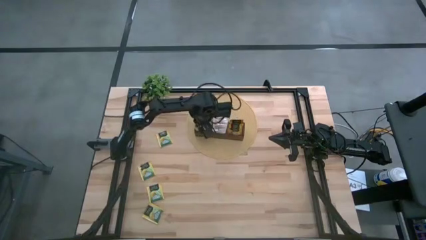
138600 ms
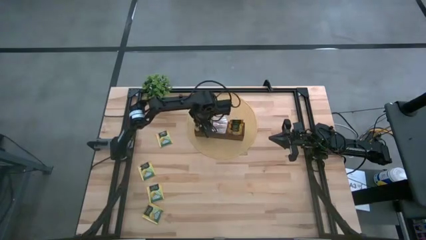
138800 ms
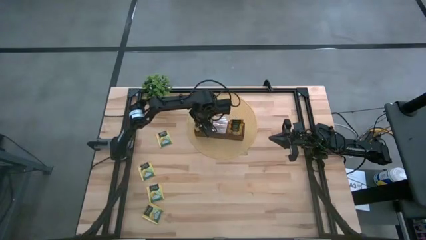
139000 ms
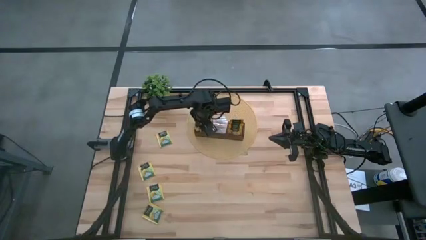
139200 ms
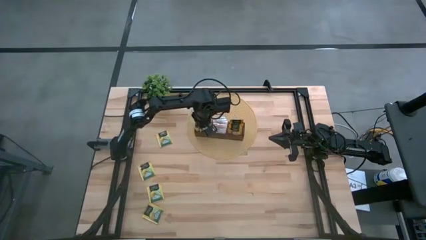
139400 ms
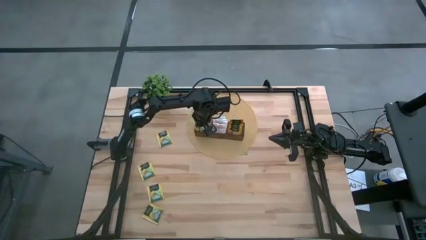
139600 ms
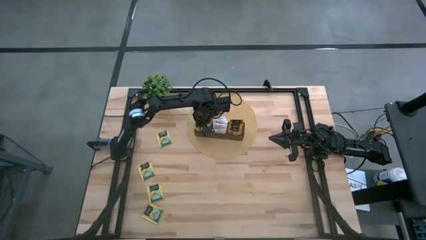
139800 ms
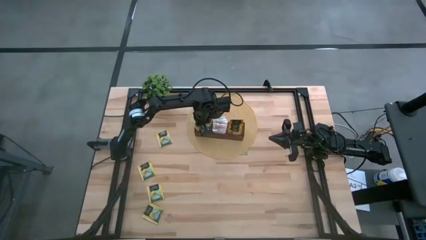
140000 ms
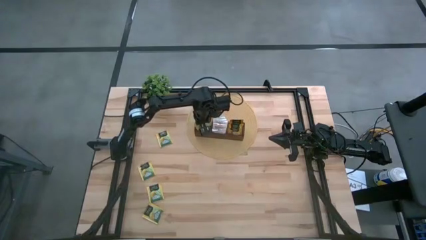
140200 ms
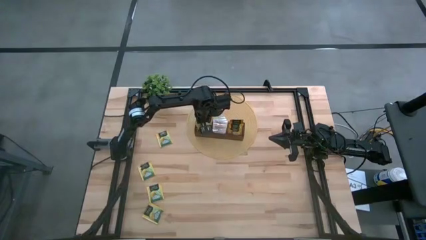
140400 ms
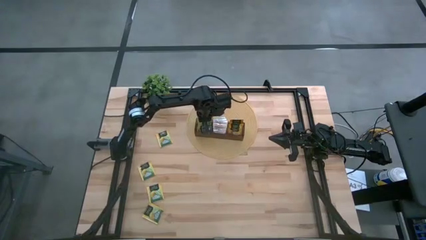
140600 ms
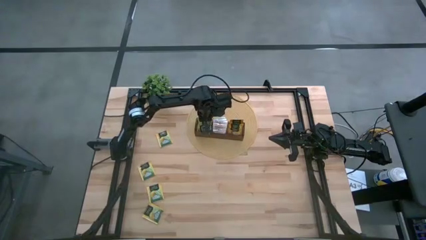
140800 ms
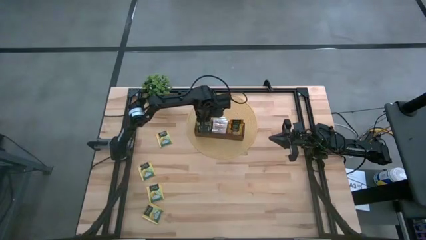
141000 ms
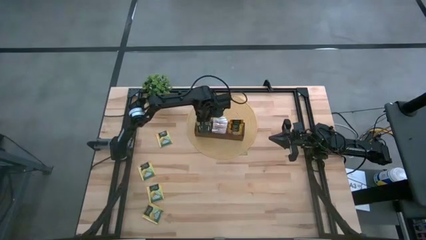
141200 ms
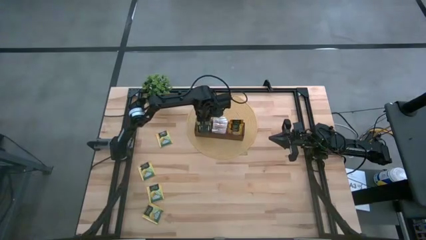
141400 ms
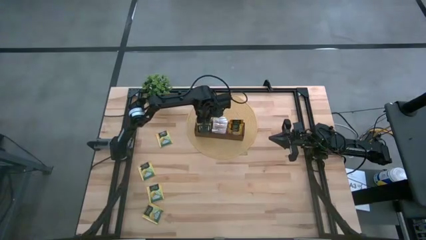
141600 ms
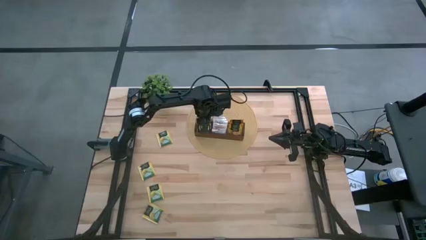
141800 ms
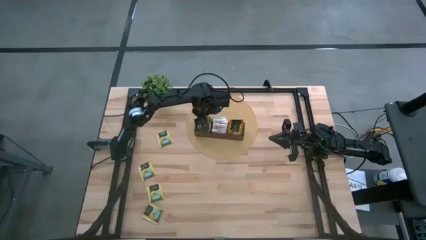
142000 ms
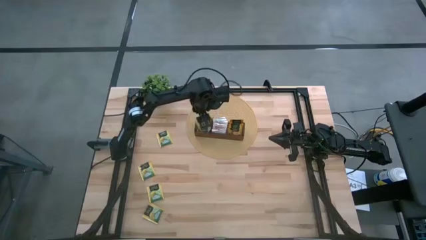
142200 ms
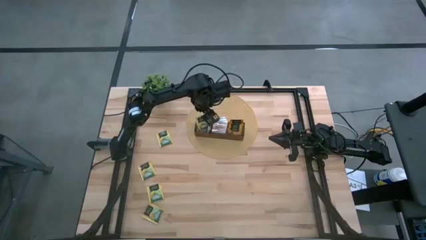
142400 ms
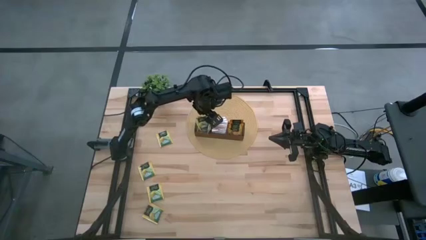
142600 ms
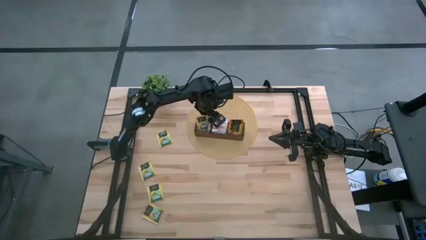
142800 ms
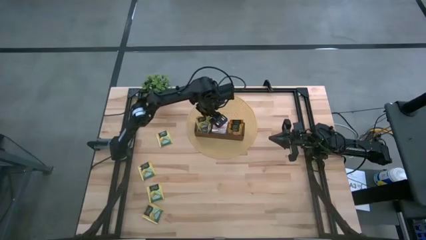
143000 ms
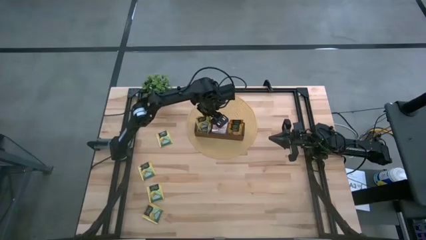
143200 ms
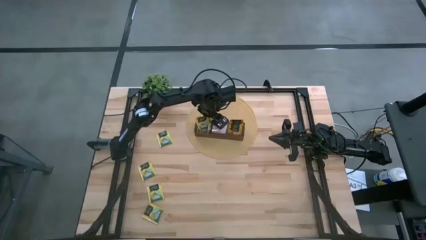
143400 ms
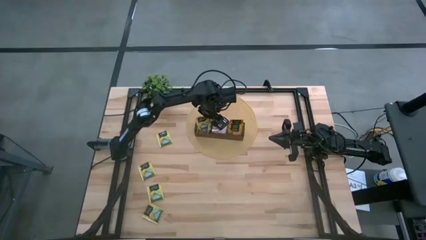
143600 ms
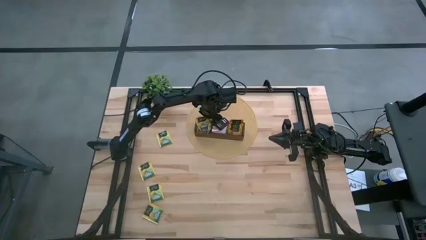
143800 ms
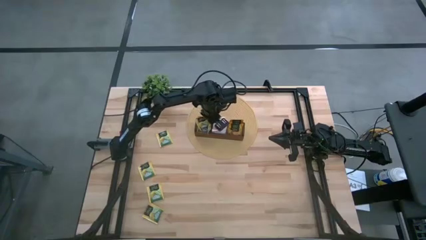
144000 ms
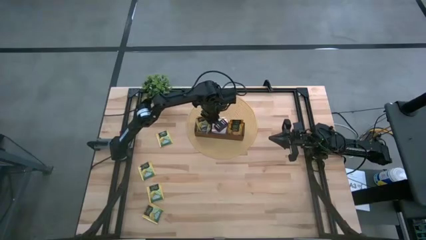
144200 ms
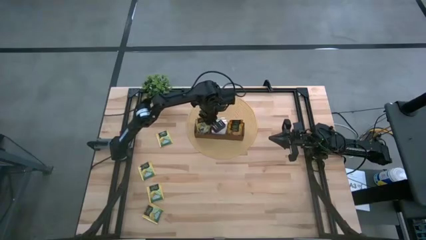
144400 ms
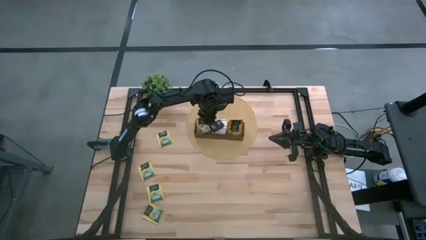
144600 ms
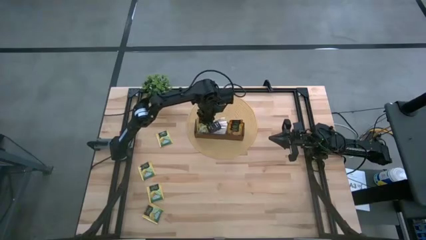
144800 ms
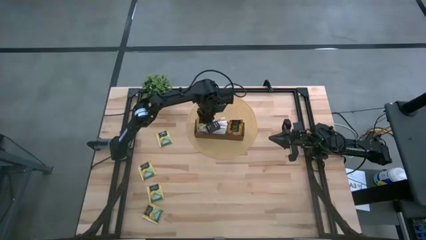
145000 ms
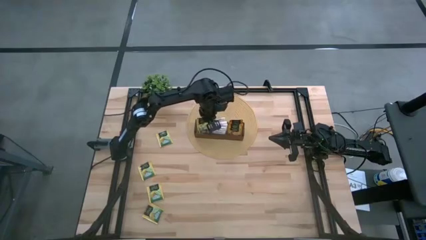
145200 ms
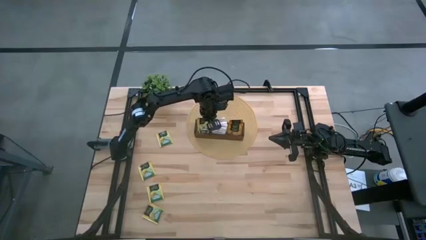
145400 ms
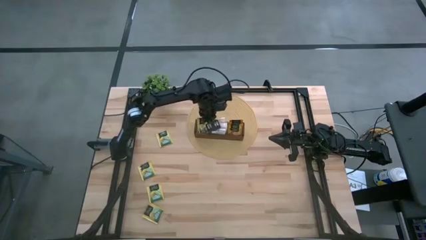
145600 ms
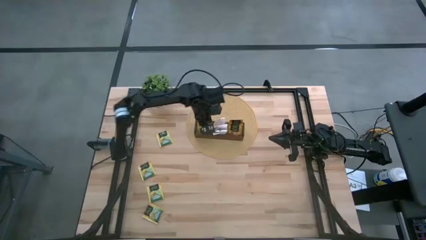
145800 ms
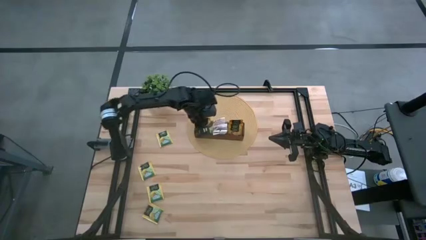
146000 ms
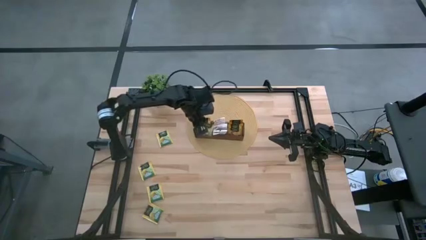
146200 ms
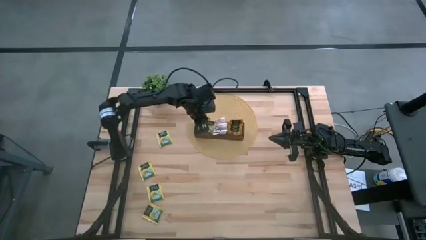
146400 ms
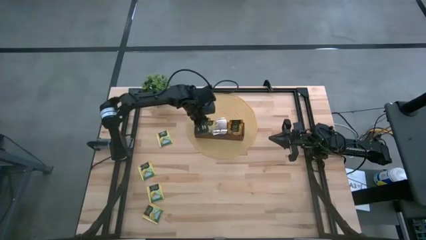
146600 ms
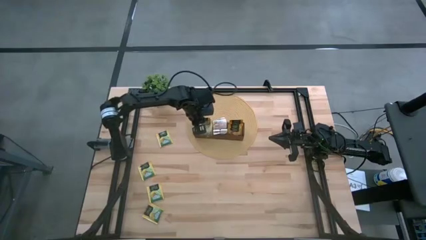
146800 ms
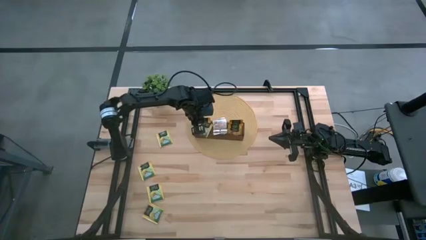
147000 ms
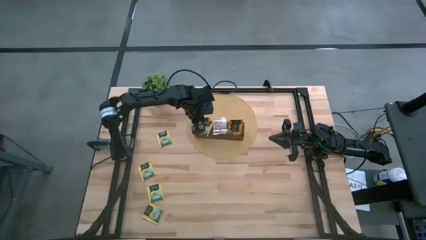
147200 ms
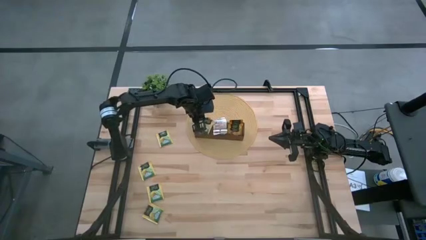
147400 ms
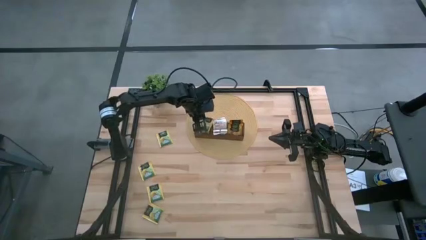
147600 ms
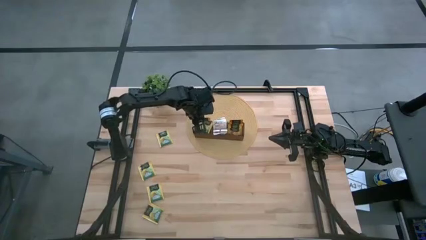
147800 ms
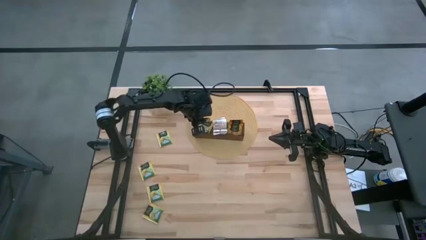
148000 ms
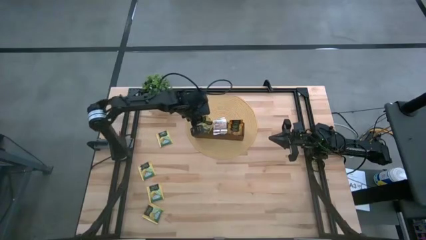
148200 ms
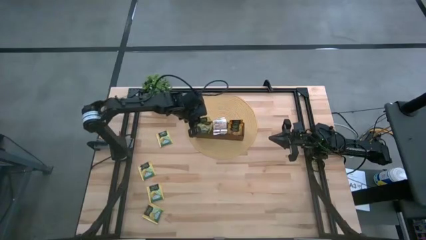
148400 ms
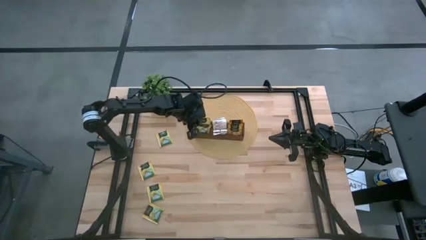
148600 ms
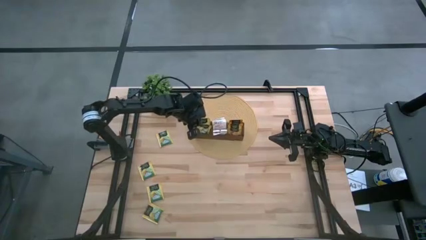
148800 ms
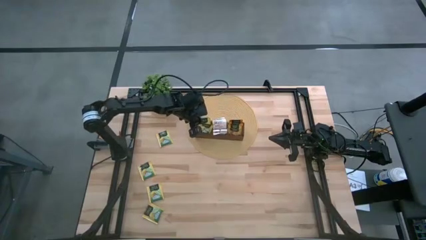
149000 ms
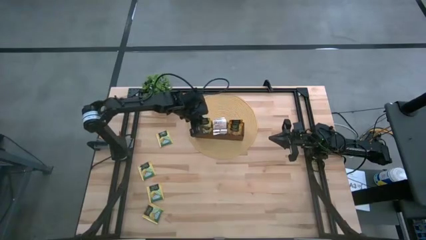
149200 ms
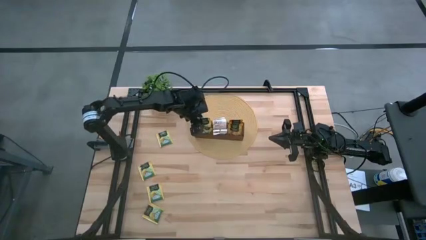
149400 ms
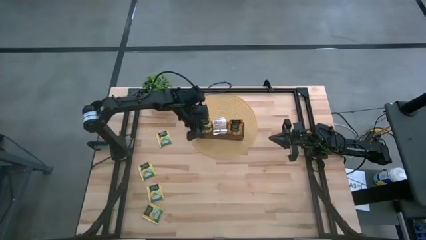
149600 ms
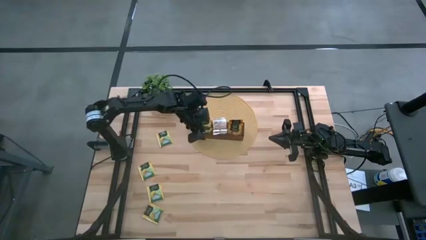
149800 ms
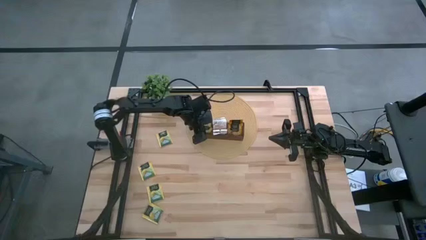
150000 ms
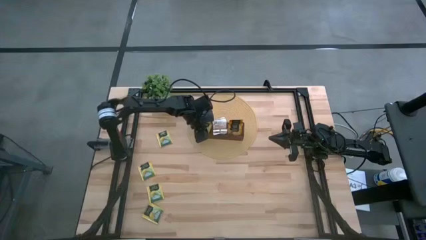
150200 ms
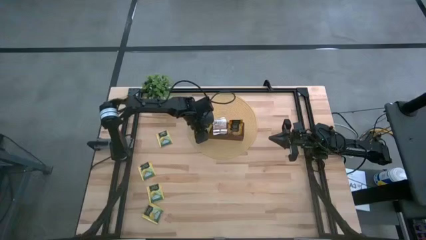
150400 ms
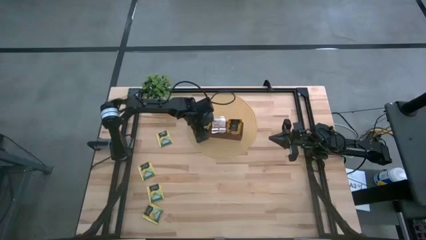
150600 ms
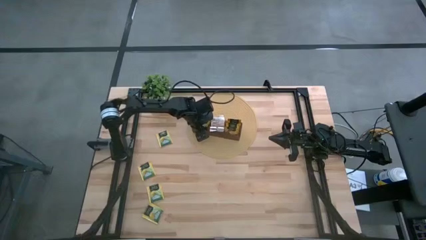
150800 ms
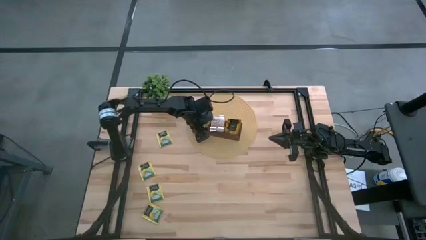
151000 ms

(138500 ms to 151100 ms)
Task: Pick & Place Tea
Adjust the yellow tea bags in the left section of the wooden organizer

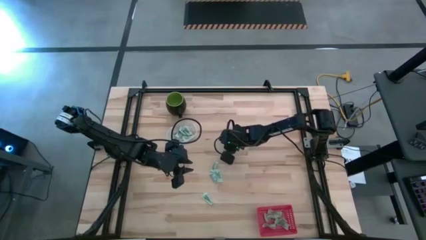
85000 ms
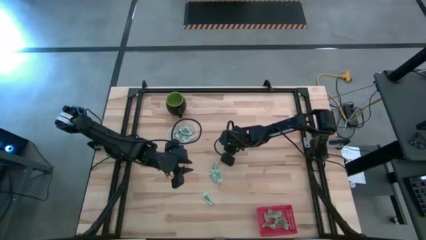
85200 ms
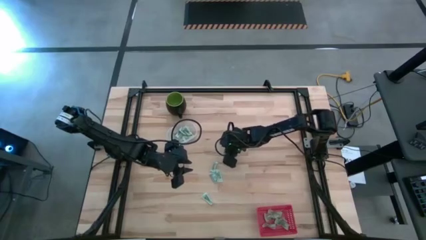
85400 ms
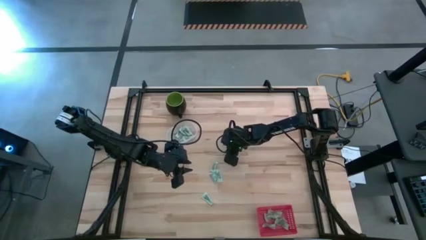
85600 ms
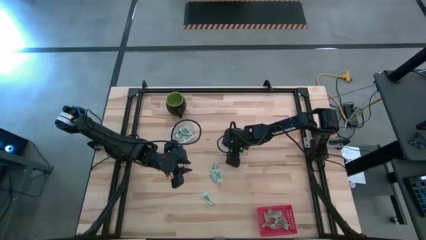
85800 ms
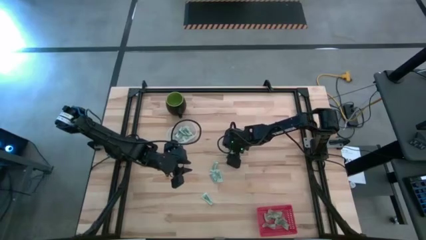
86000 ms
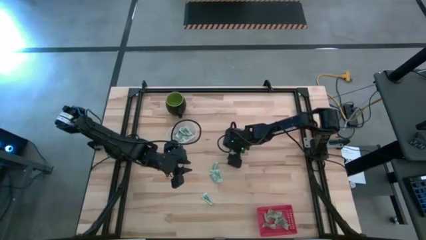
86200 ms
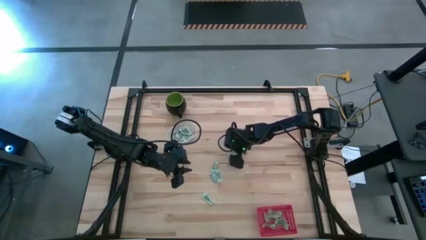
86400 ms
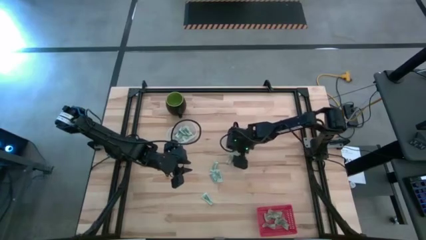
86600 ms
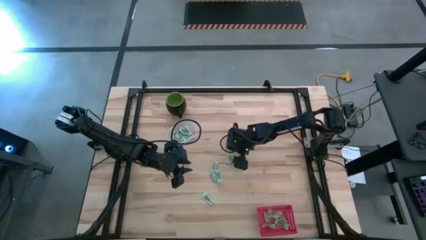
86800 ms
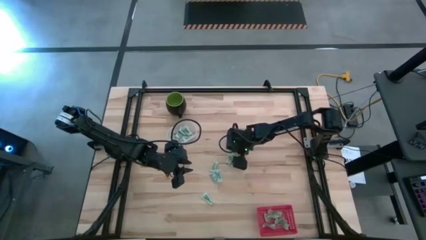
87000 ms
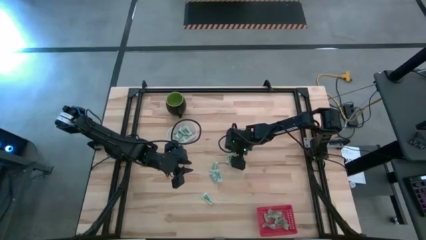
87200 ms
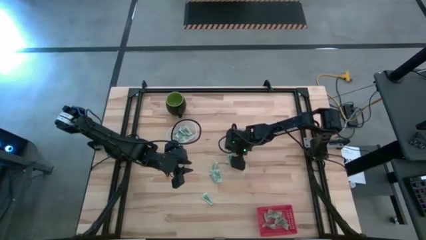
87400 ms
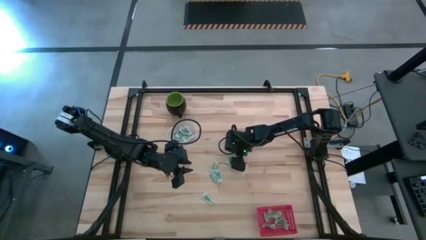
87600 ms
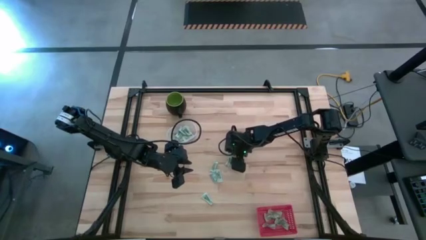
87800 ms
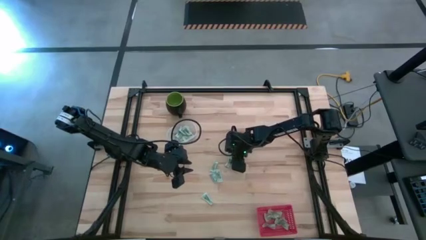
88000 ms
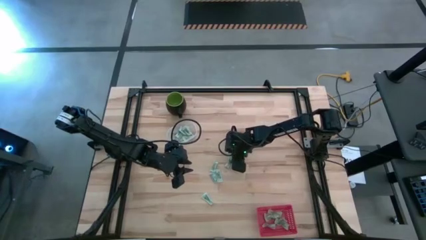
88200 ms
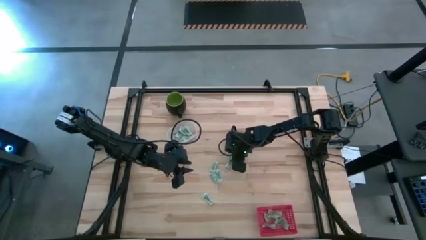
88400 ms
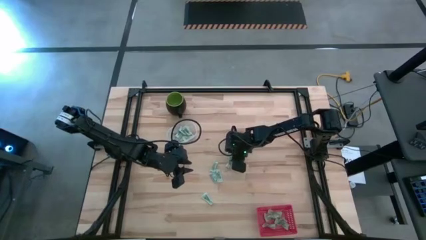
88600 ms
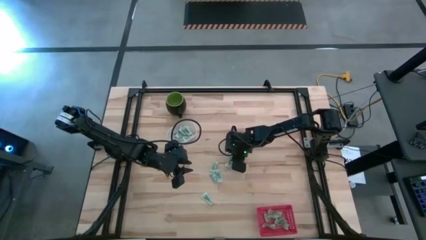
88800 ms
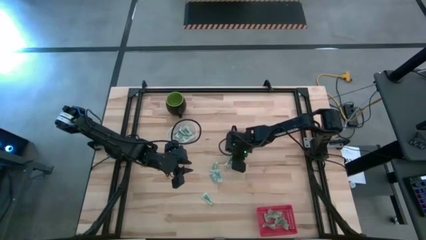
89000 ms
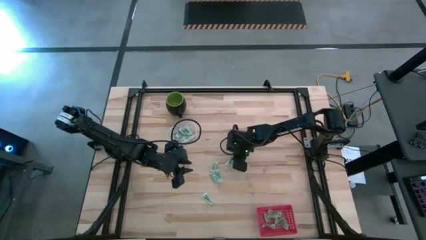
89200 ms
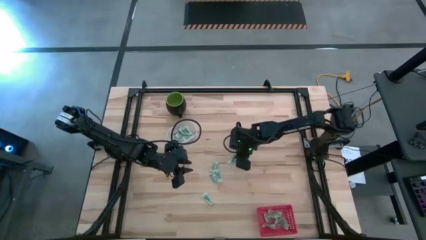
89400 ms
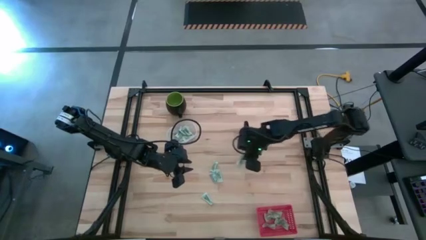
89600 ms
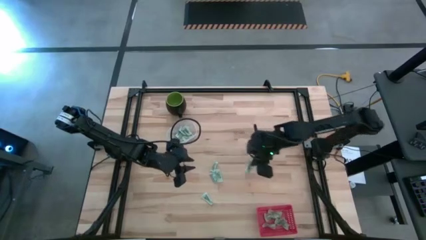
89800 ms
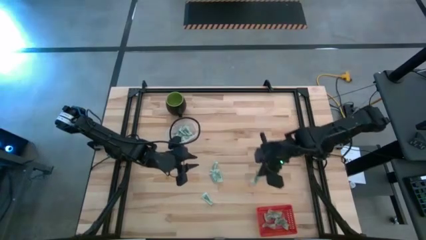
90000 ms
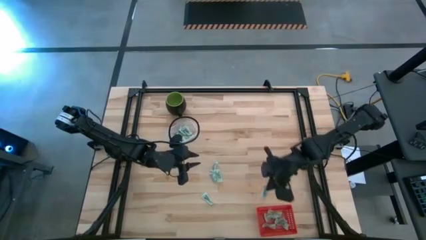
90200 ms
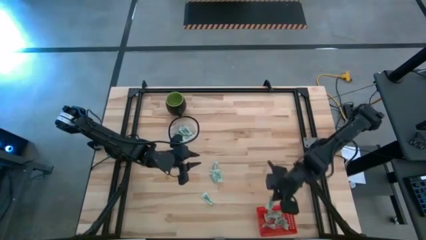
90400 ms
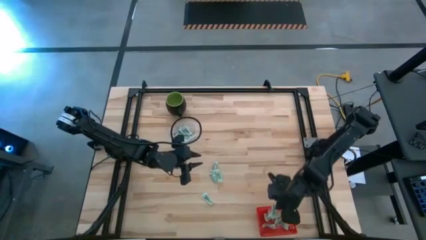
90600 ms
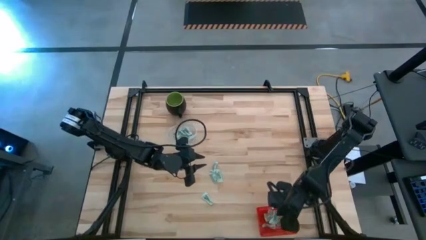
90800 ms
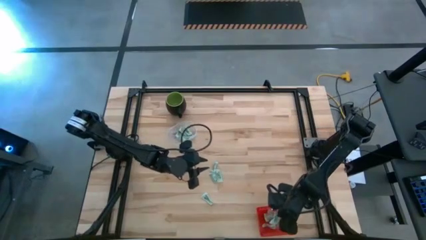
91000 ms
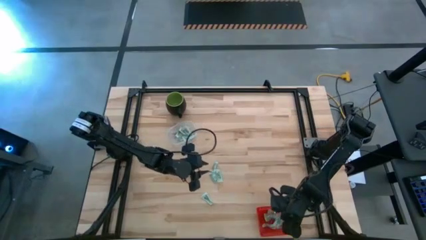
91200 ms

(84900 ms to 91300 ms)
Task: Pick and place items into bin
Put the green stevia packet into the red basket
